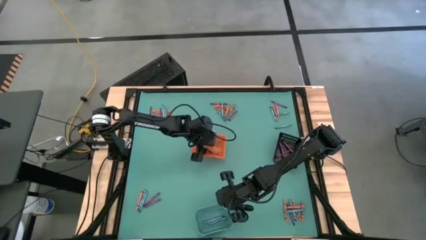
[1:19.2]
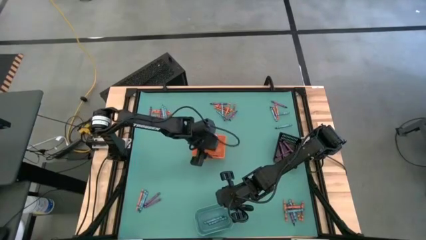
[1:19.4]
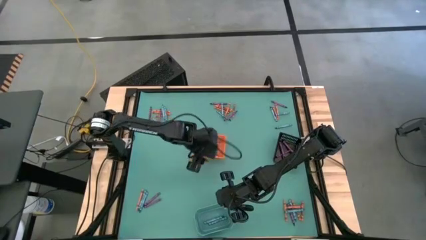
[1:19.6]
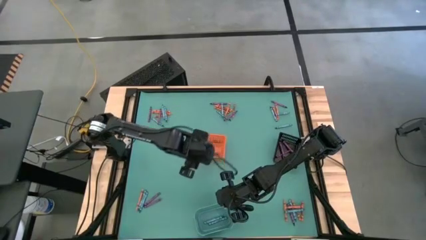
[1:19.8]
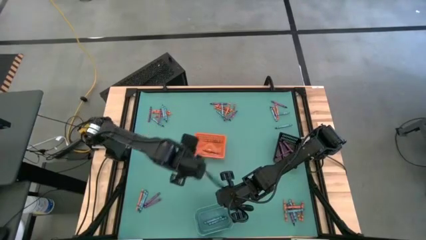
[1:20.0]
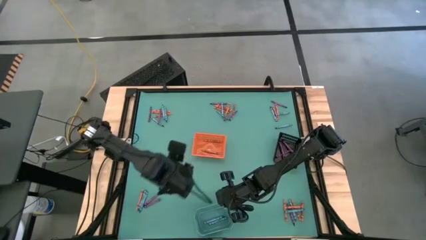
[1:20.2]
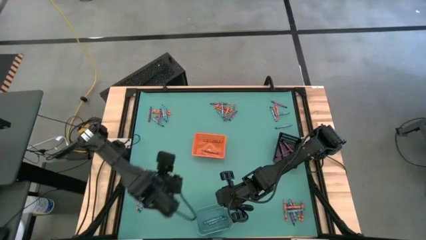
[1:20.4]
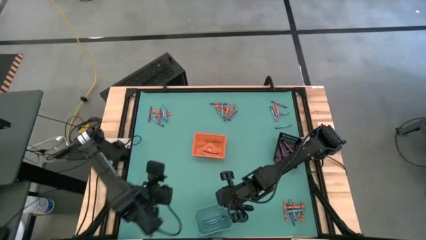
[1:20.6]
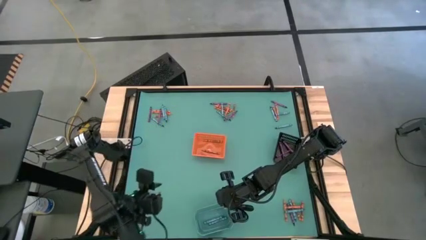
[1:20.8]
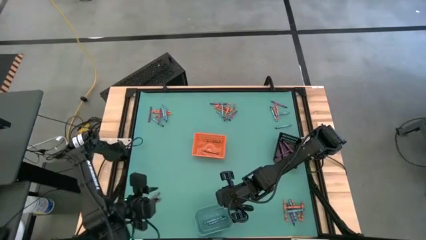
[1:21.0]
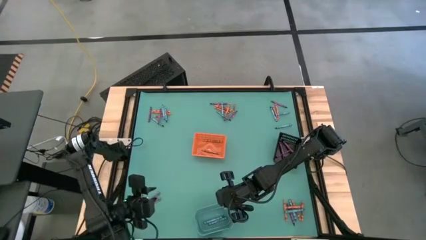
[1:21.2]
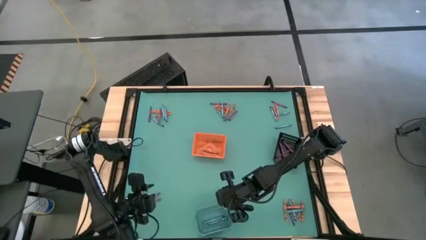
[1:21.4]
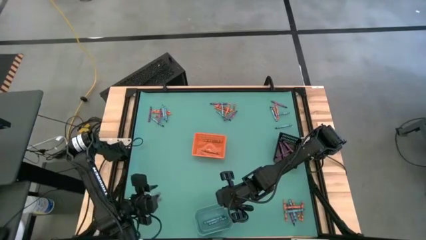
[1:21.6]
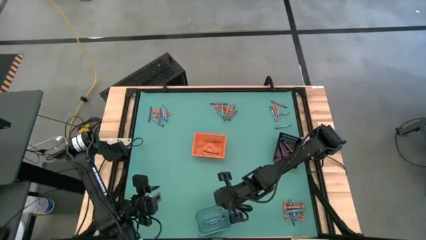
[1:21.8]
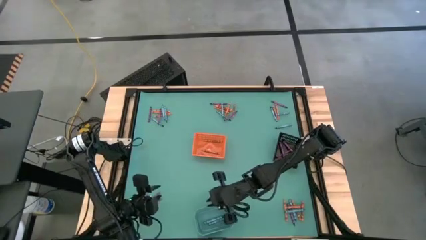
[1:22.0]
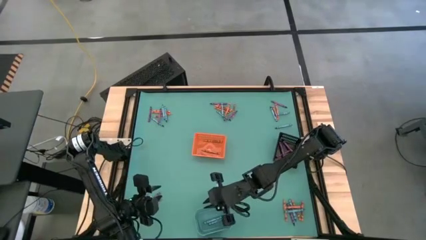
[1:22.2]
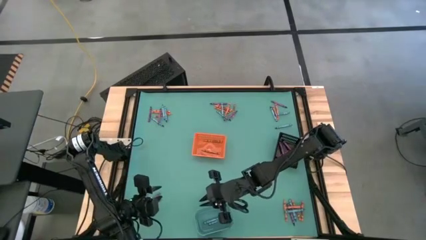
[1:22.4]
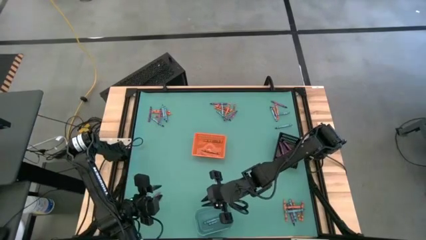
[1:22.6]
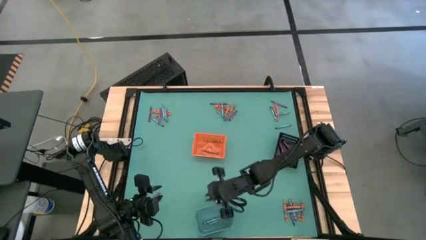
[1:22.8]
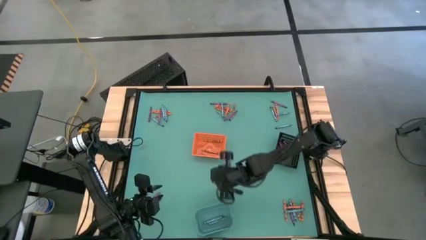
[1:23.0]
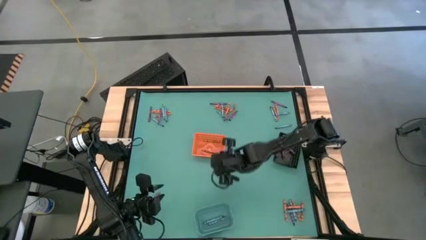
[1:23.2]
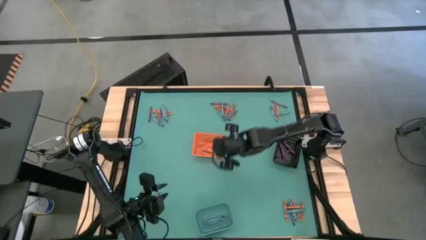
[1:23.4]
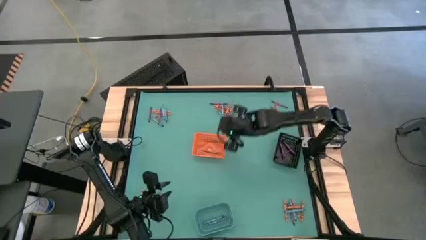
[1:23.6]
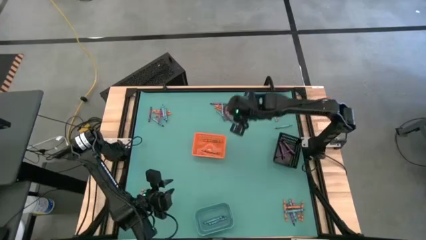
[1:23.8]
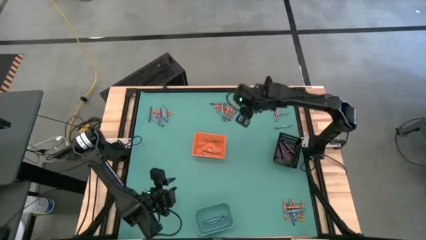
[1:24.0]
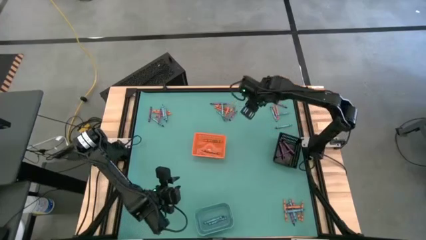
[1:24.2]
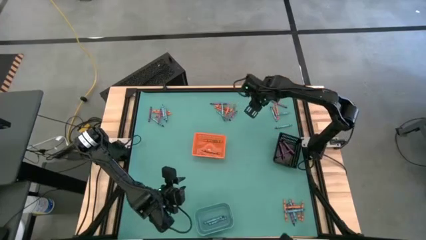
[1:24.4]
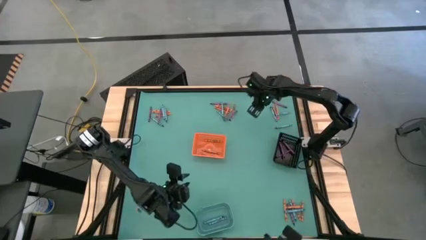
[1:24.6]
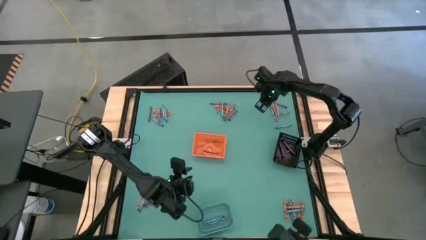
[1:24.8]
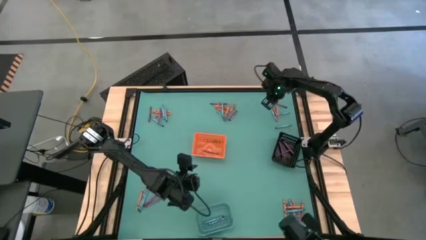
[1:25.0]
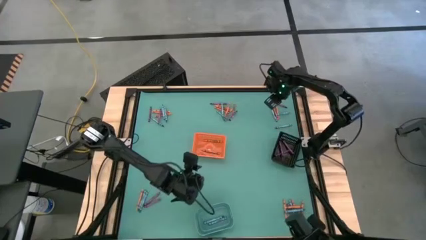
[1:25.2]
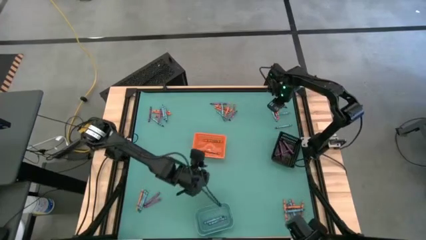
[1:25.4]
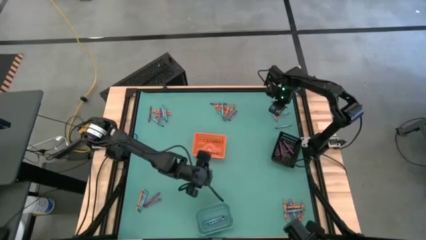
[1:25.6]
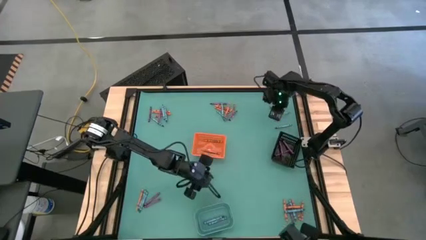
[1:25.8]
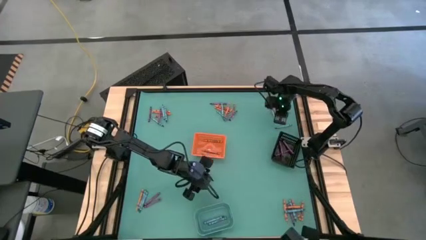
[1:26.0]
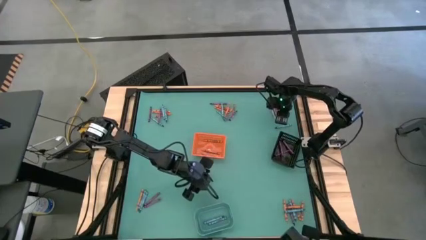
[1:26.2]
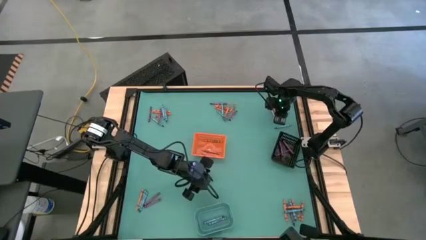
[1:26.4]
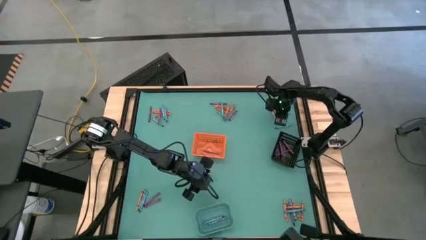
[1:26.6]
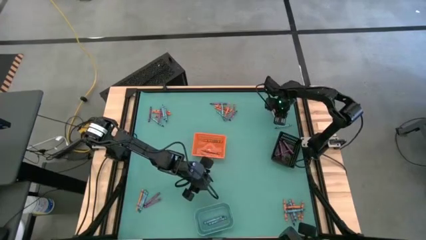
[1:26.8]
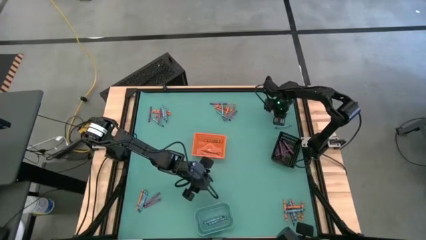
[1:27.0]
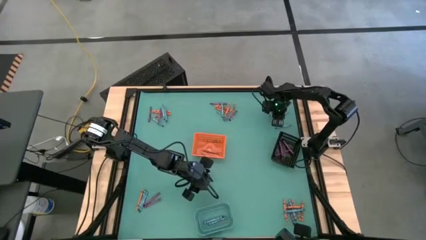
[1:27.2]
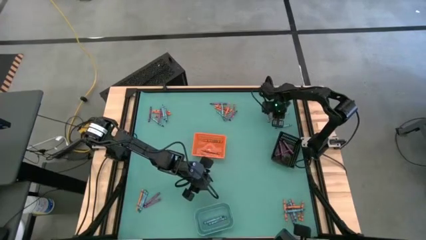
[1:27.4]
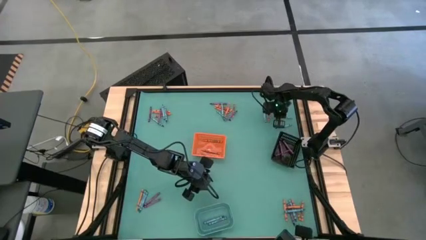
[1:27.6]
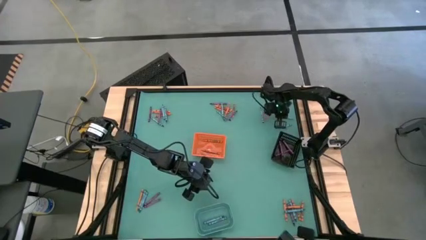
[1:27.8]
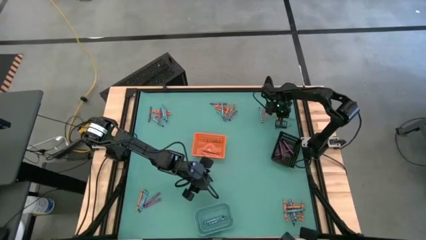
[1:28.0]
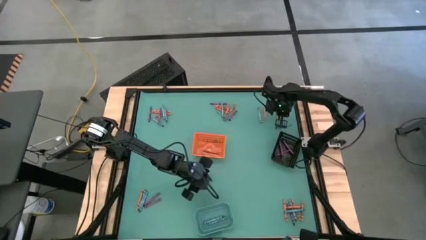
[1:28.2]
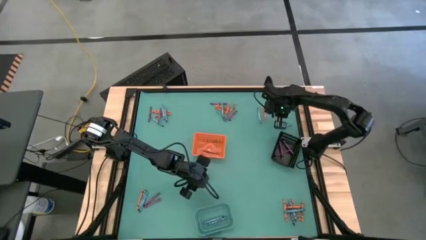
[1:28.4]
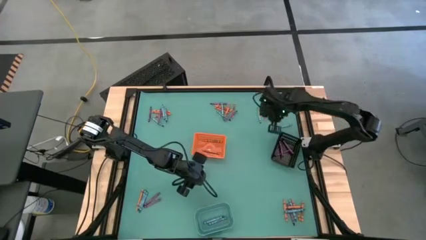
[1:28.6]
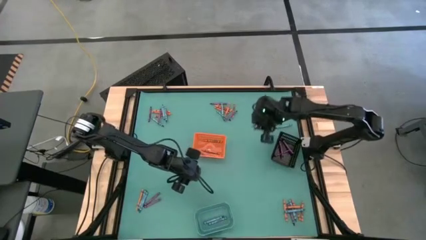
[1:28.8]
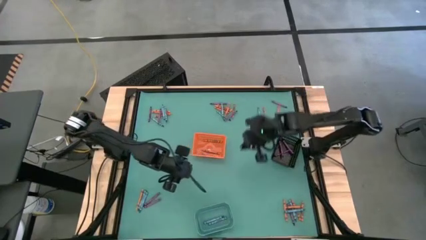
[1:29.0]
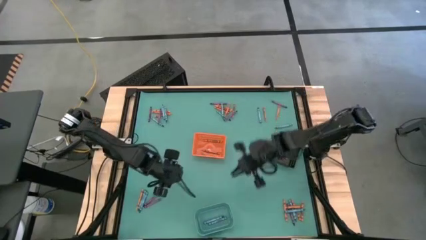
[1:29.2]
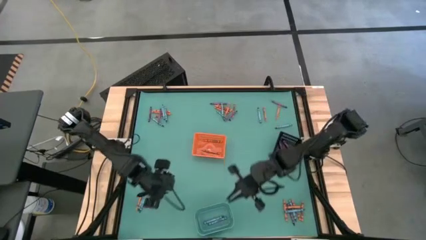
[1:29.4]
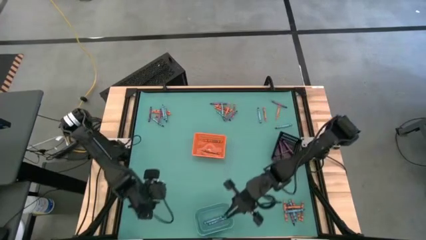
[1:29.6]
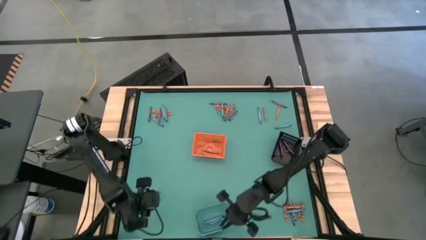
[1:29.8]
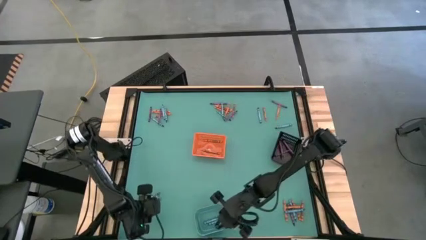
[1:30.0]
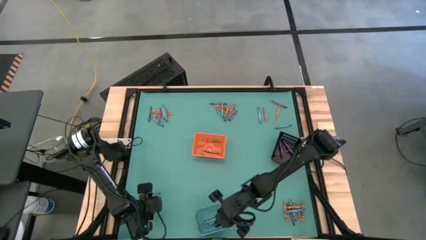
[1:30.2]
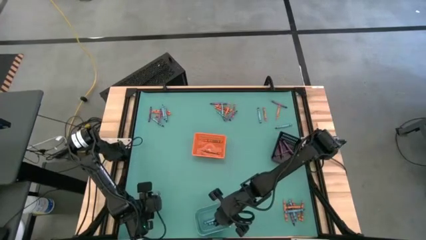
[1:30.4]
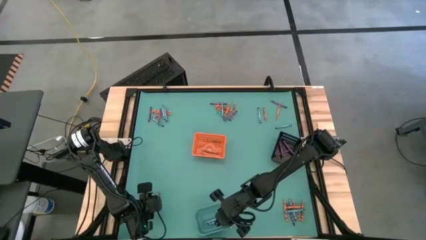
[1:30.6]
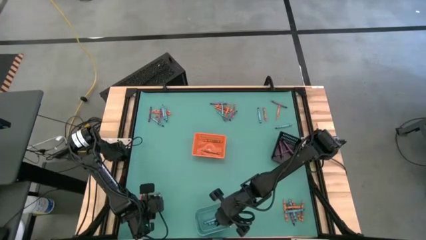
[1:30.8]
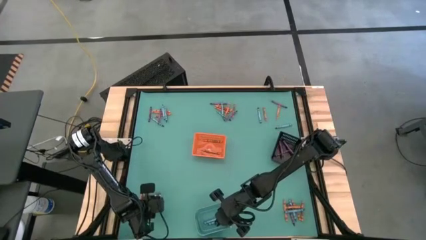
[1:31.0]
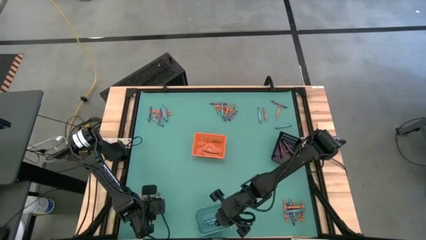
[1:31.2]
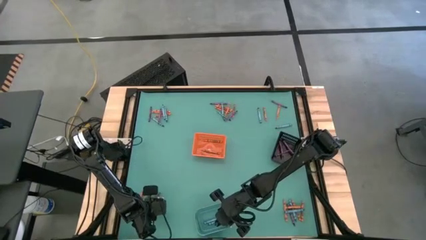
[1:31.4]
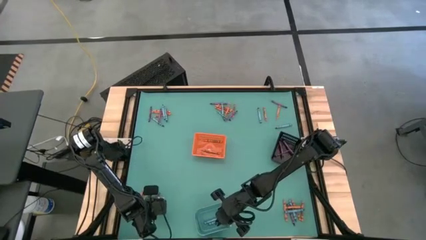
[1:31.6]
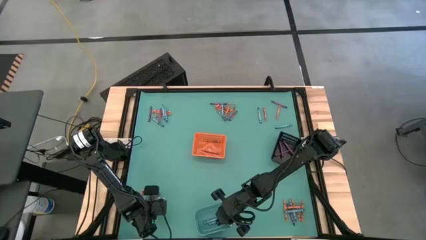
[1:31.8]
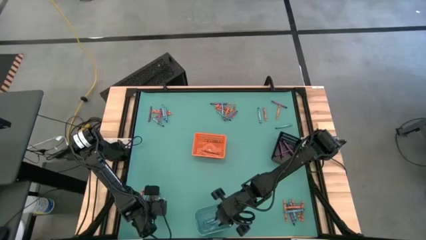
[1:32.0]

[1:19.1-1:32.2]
Task: Sort crayons
Put the blue crayon into the blue bin

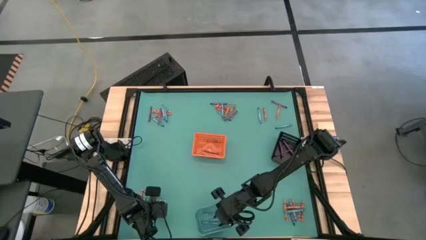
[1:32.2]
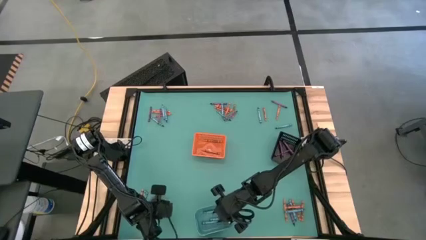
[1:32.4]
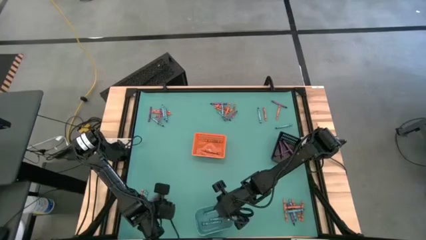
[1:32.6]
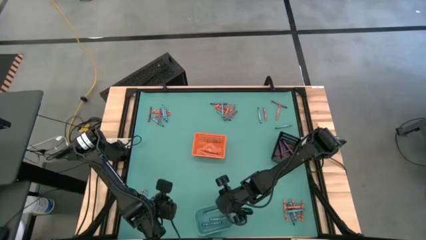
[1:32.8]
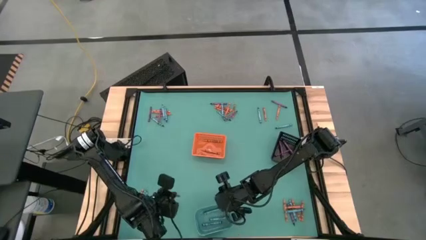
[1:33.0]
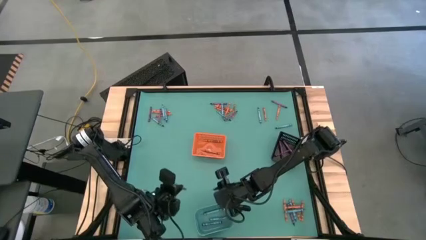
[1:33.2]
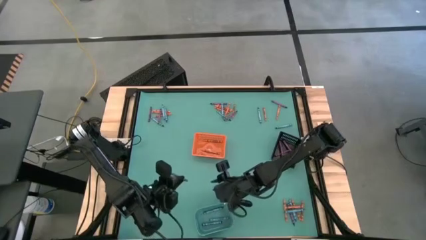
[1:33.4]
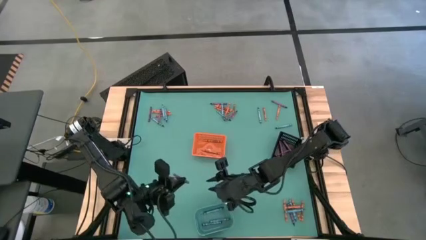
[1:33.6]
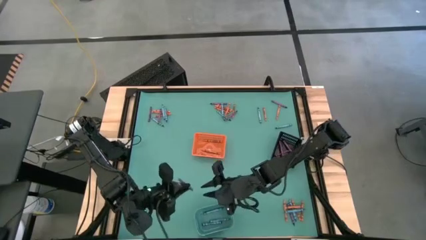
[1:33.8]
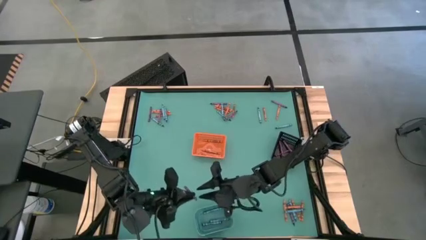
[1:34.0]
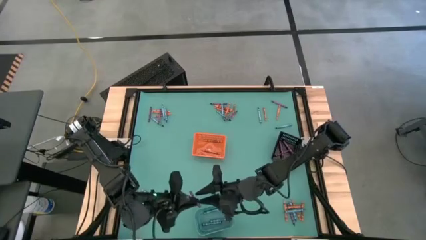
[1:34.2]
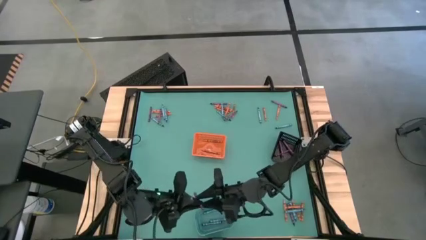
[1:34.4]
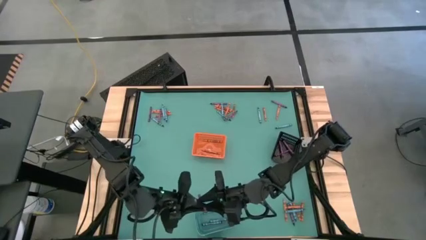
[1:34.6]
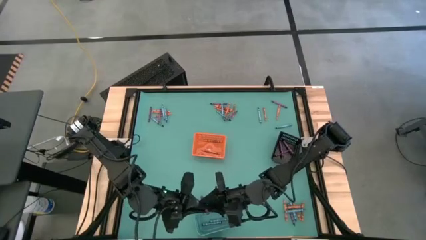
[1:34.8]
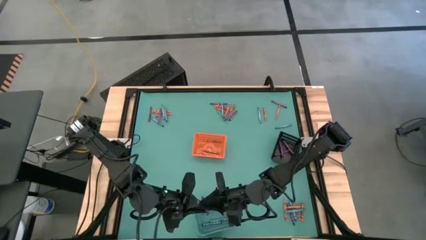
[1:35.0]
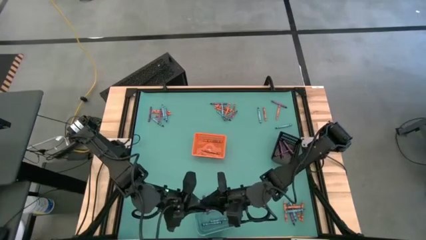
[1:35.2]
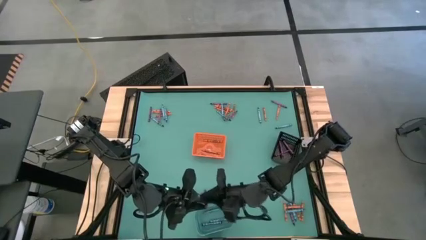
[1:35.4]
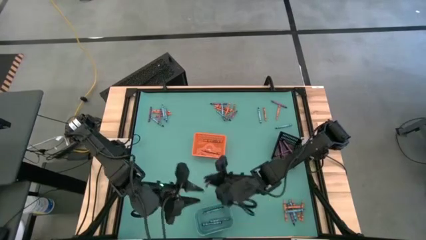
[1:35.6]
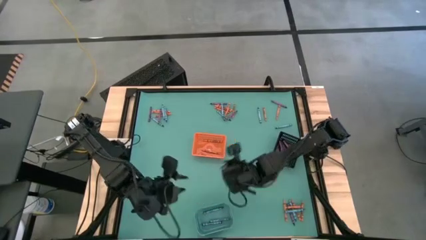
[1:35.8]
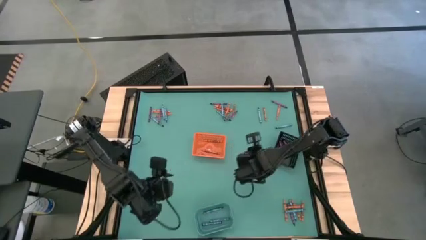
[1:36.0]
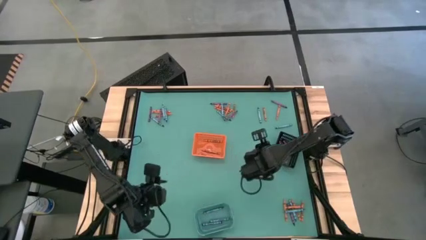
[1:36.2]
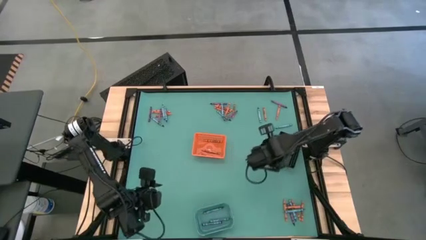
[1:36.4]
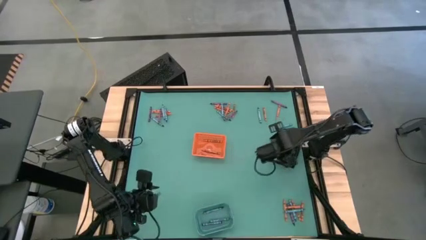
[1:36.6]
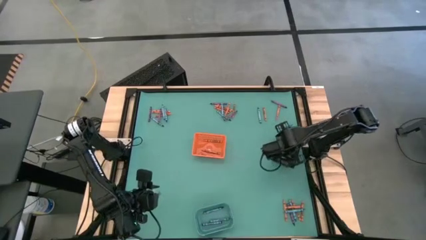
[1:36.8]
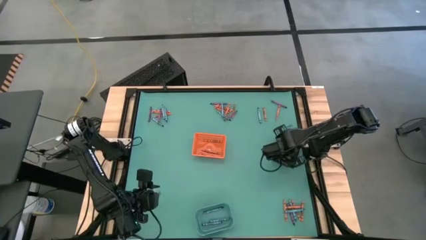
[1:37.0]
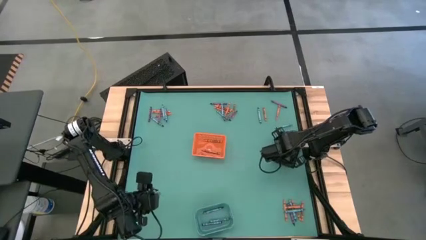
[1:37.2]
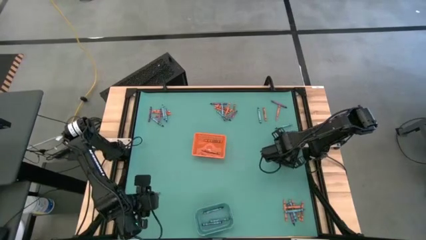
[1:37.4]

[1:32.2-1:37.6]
Put the purple crayon into the black bin
